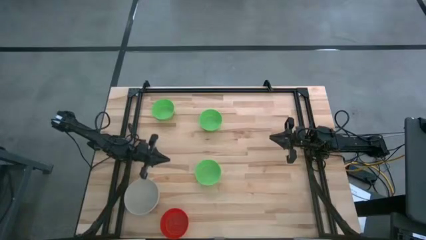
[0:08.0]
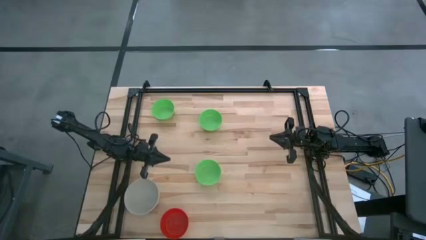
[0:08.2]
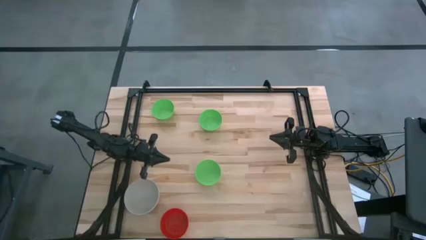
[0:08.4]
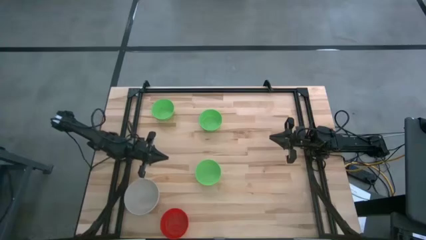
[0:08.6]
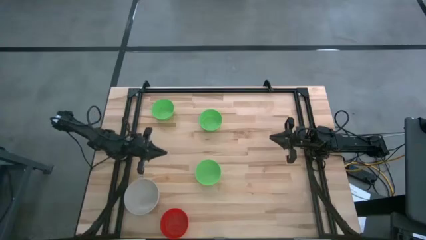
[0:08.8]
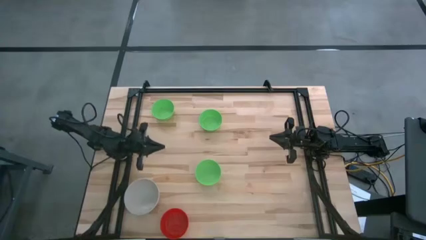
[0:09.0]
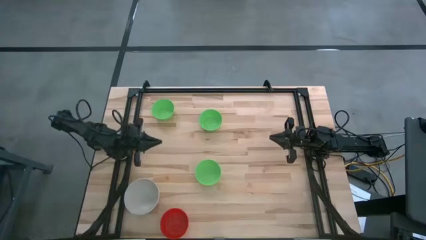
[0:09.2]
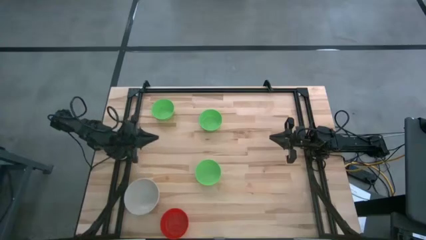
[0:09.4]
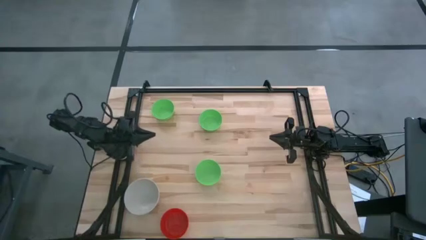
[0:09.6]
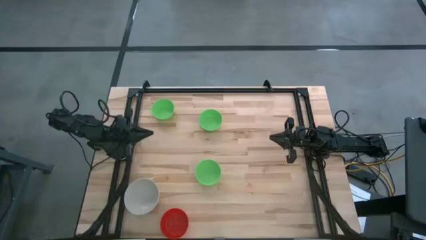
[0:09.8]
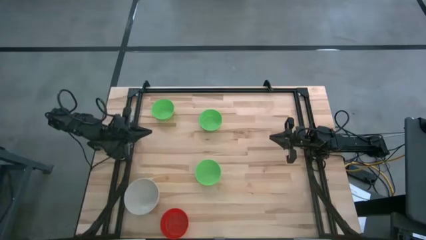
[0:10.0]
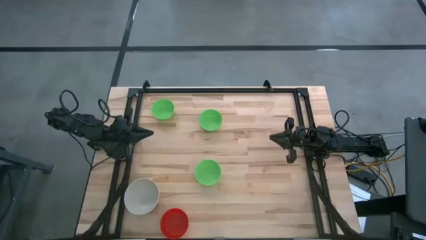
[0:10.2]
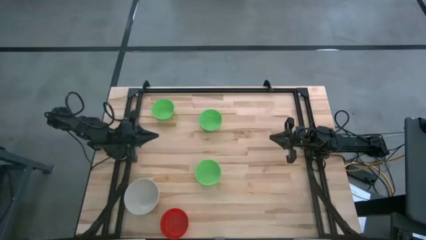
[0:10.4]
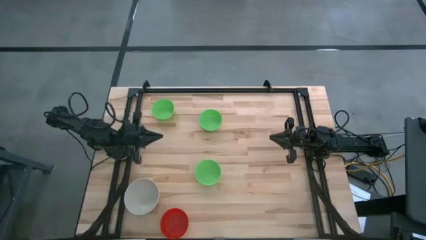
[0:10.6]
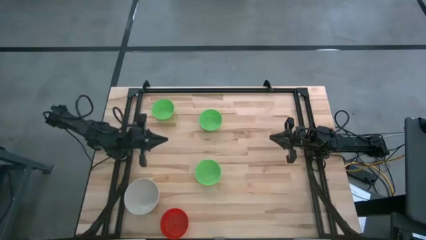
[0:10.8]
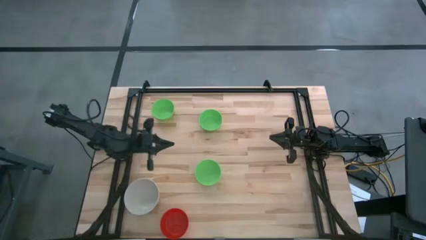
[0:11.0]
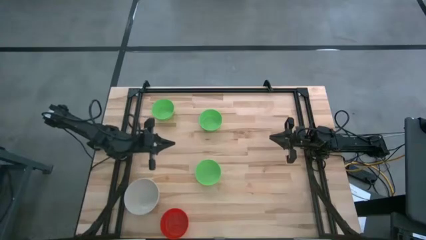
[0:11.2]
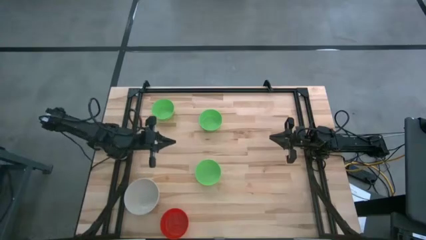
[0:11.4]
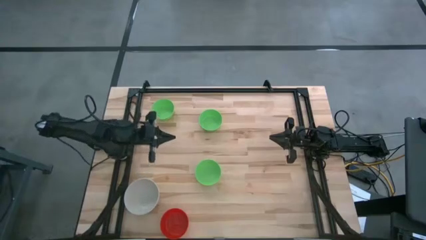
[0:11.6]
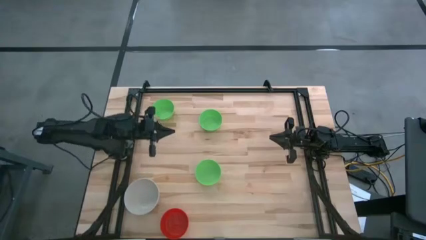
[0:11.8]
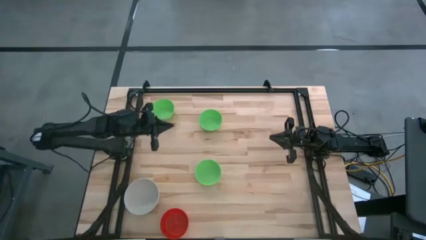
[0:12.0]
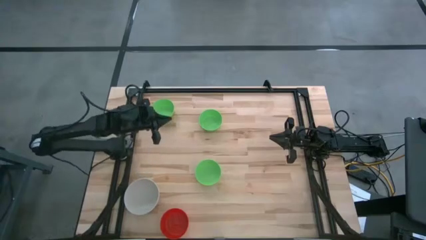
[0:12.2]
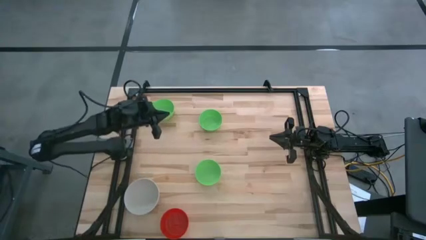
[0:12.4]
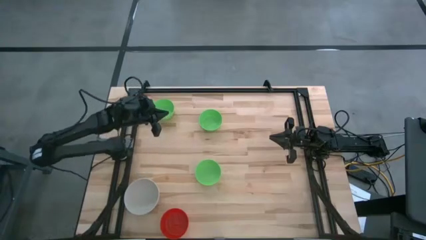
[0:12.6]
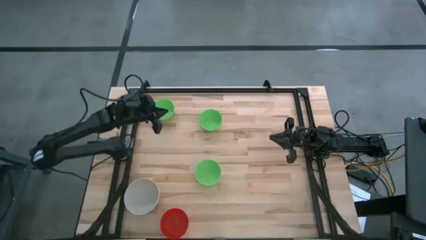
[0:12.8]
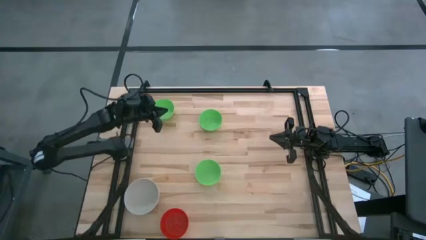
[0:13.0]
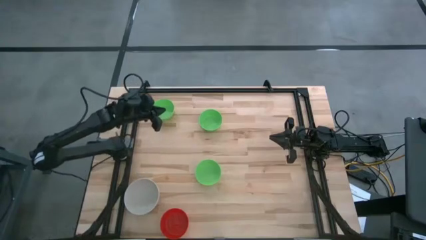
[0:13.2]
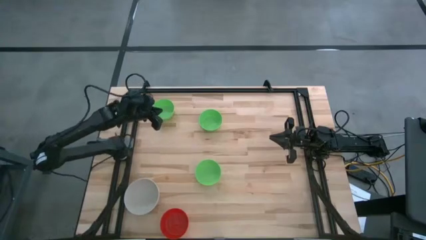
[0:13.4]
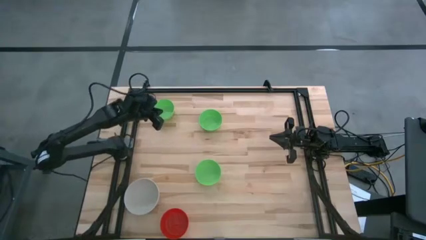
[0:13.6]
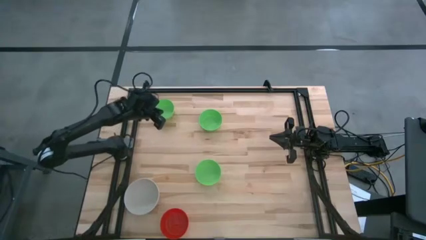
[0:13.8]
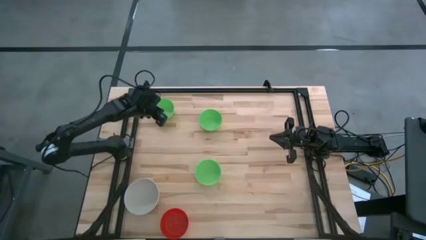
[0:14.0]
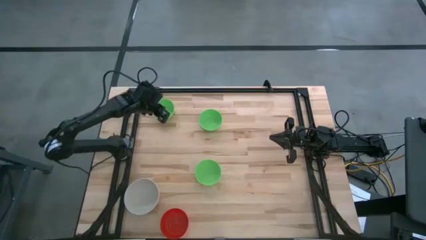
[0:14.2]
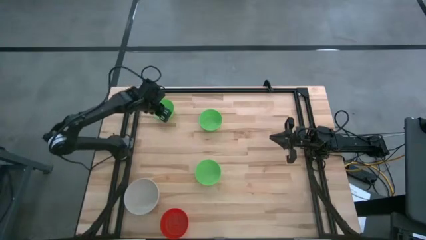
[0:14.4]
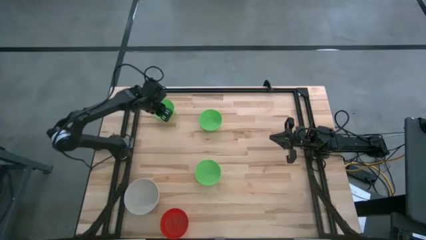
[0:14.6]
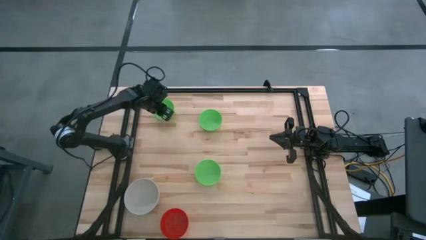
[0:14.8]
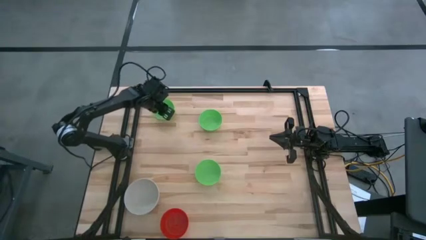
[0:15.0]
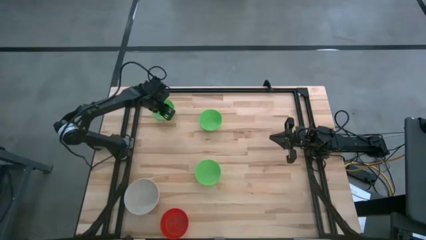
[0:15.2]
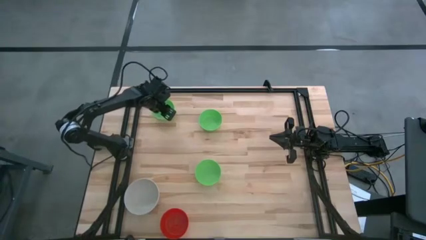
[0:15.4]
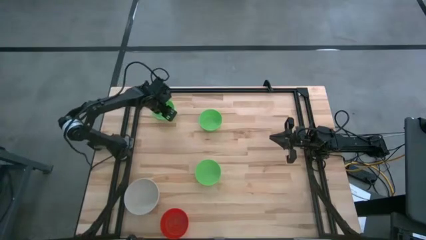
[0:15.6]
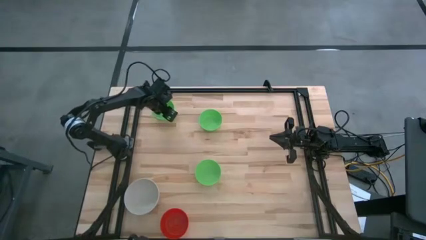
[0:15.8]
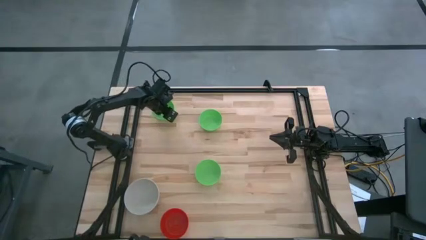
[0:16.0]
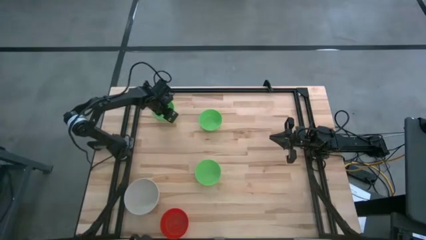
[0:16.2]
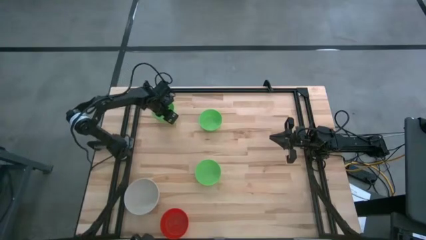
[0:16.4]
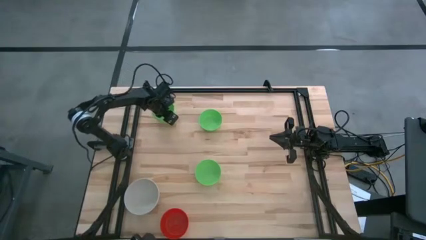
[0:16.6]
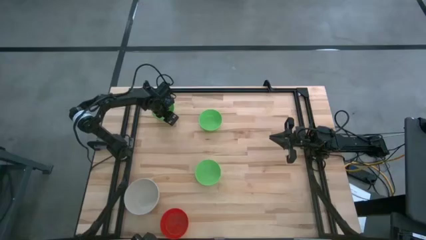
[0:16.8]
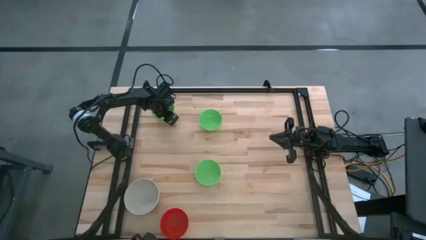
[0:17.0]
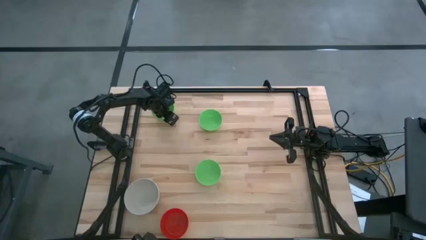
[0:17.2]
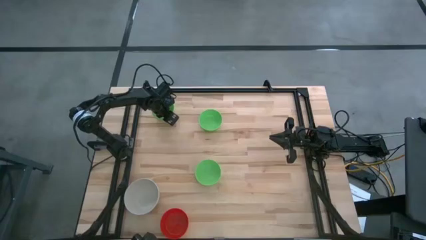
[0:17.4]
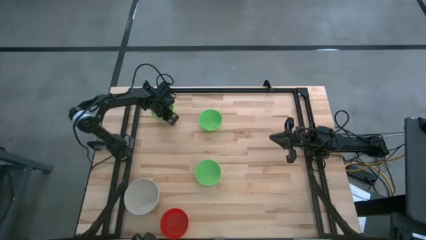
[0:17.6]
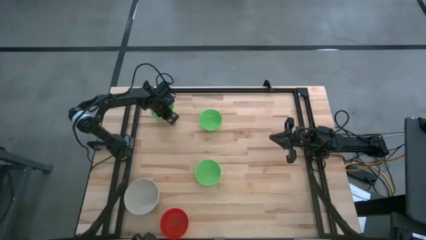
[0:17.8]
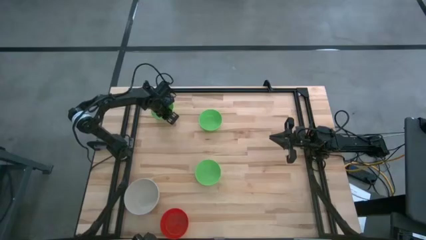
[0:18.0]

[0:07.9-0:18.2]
Stack the top green bowl on the white bowl
